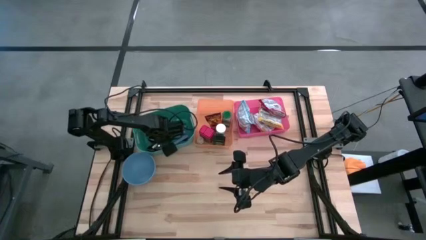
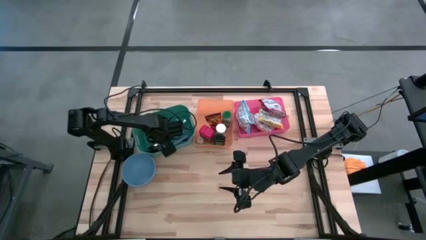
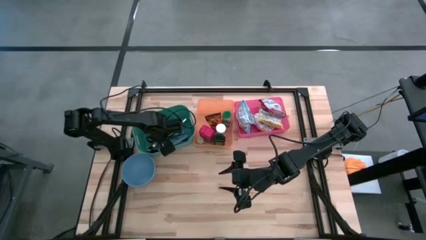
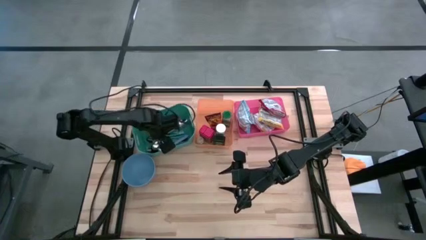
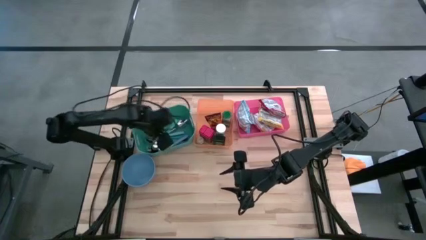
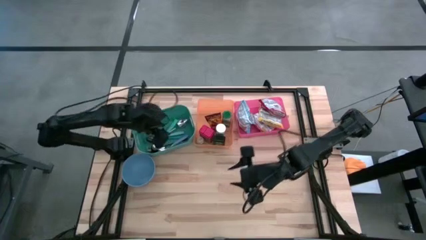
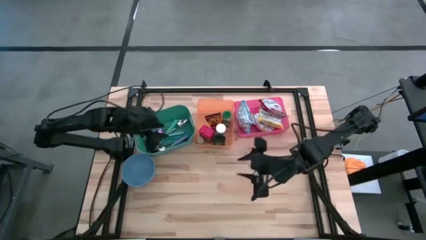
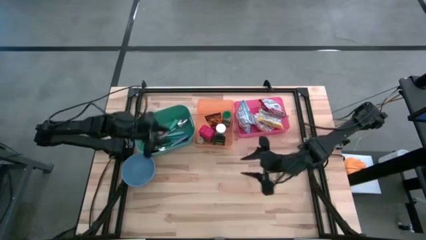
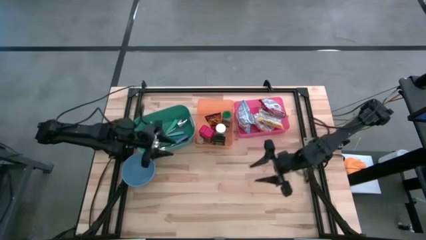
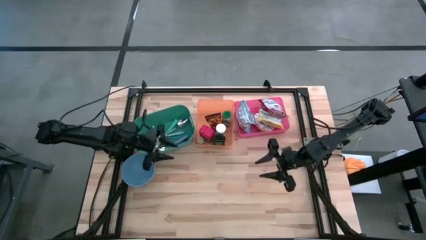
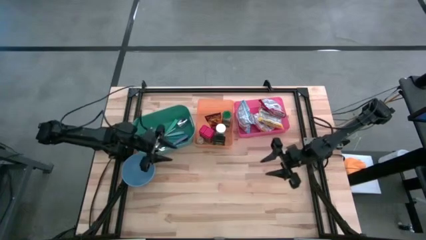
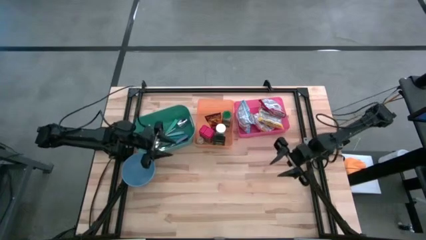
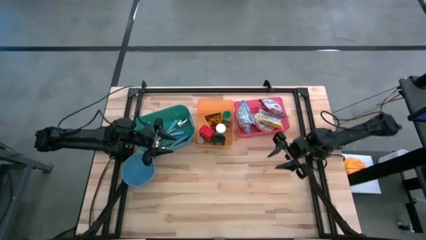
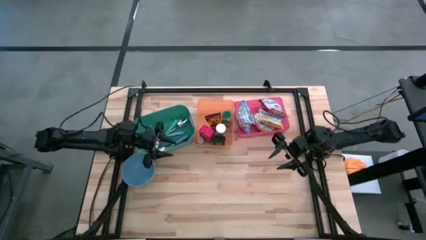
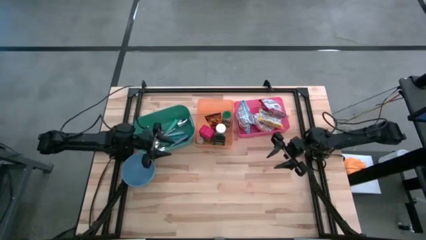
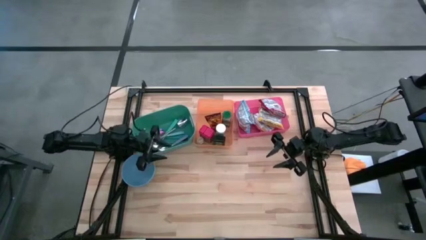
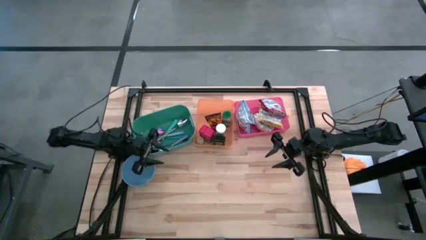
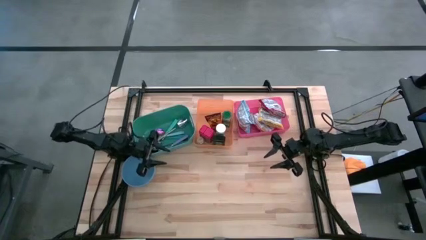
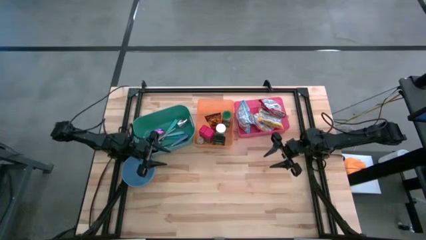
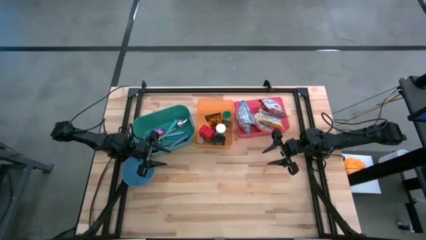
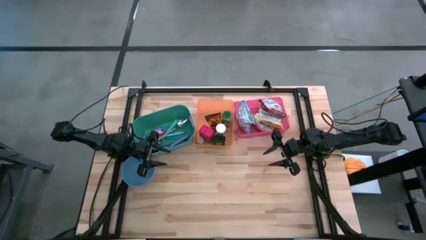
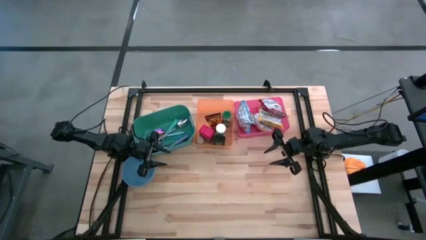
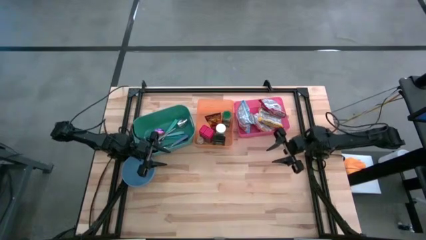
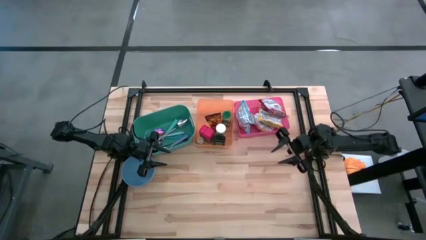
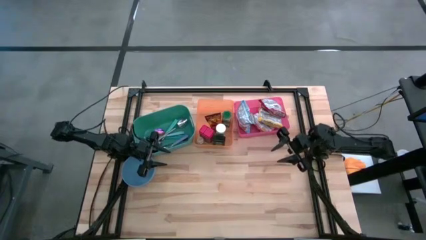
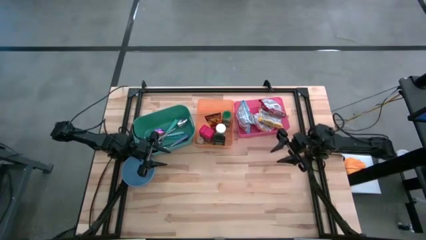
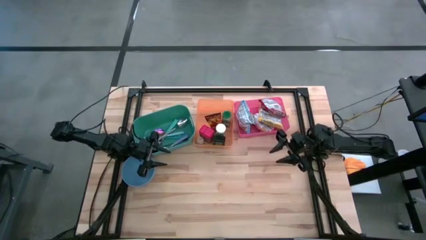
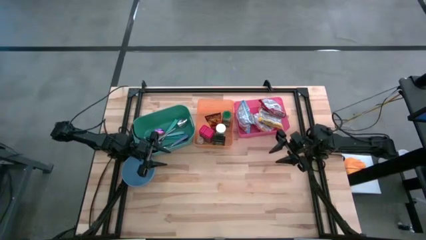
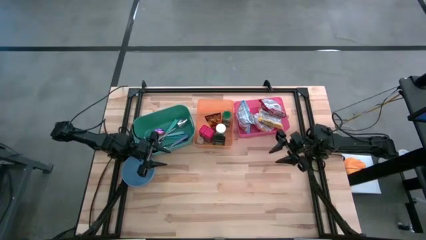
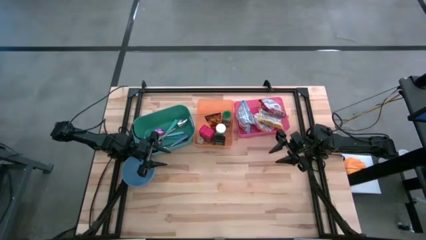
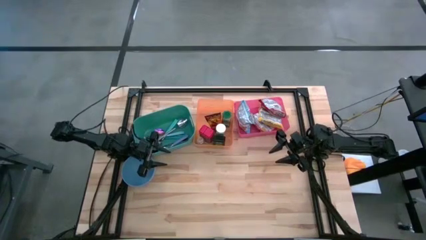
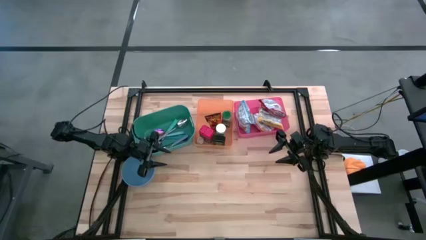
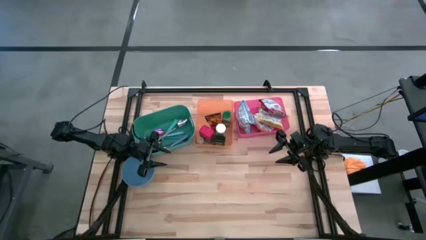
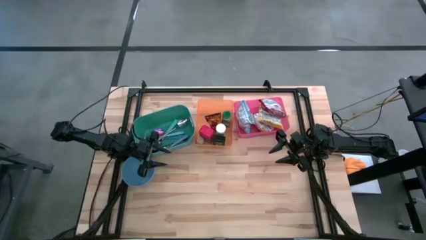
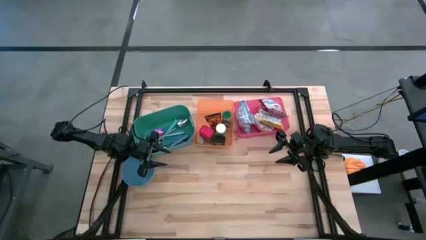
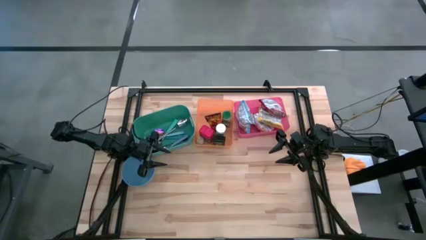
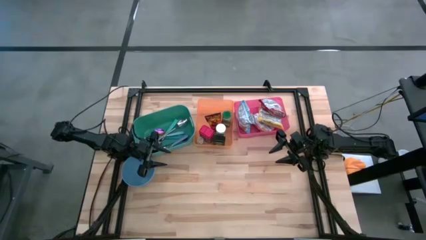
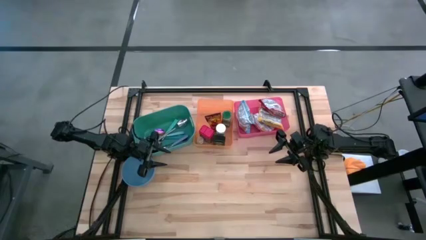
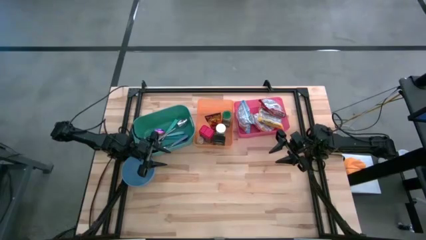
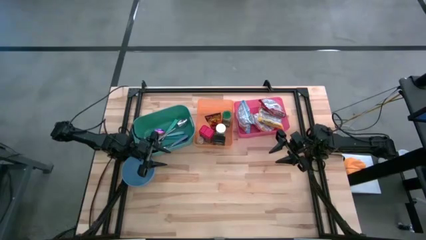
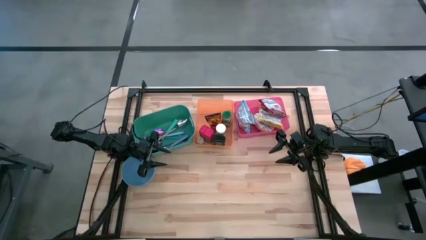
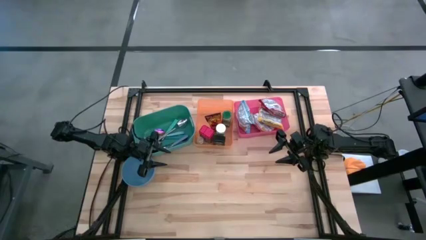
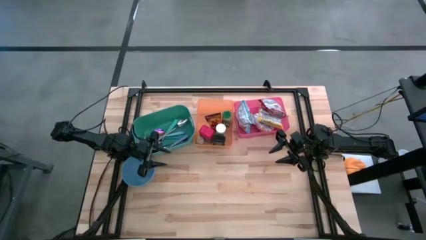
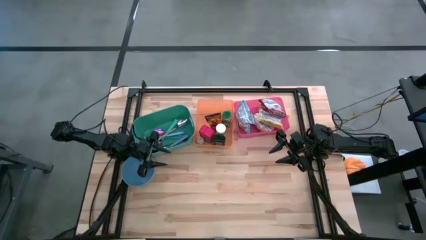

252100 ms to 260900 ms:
Return to Home Position
